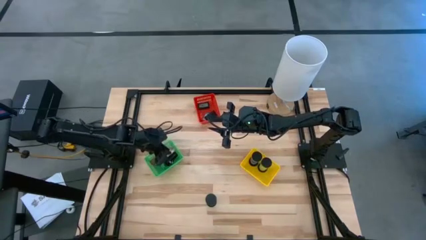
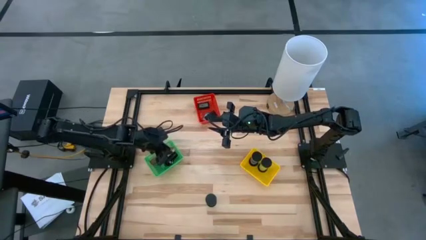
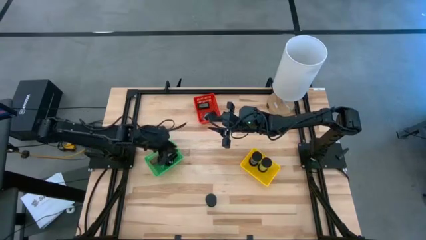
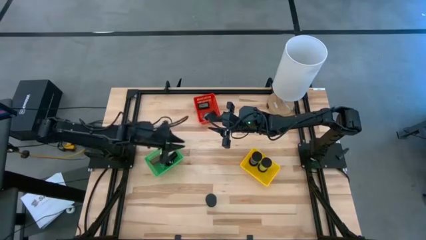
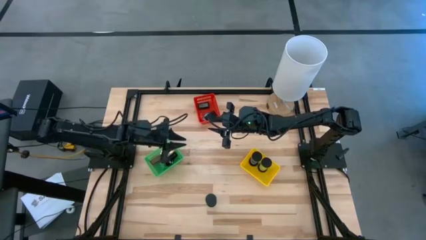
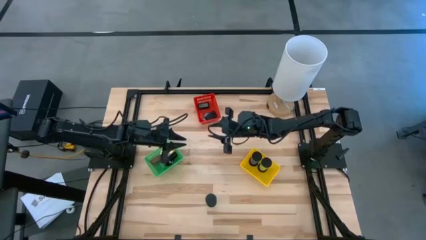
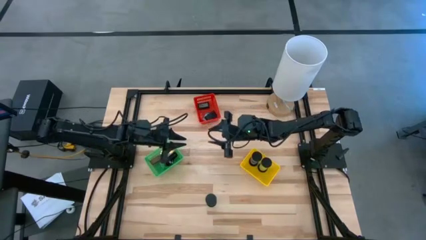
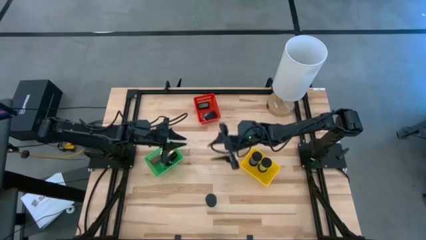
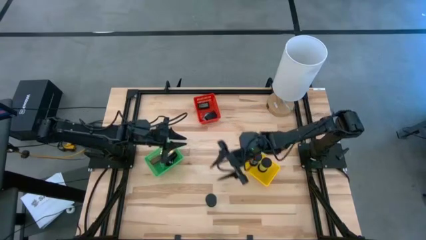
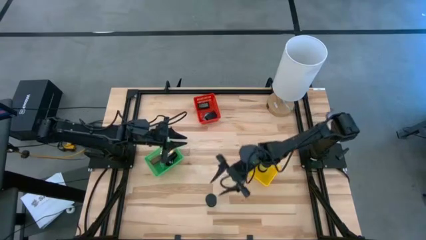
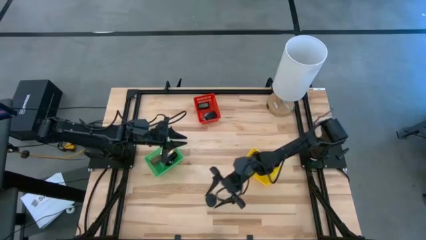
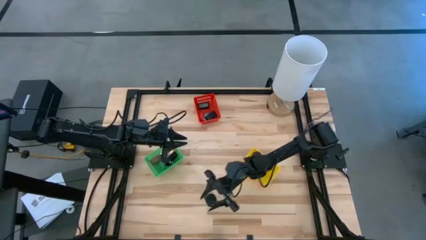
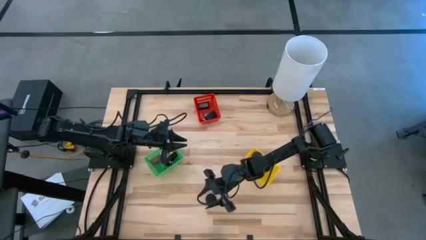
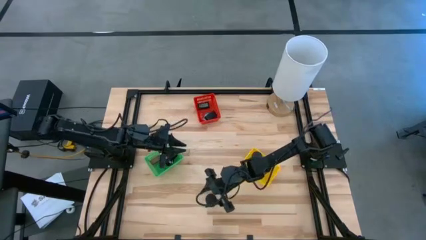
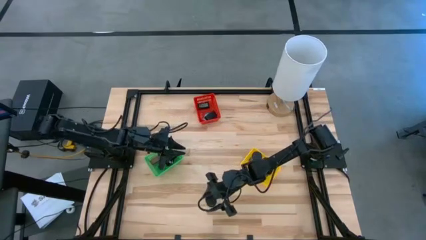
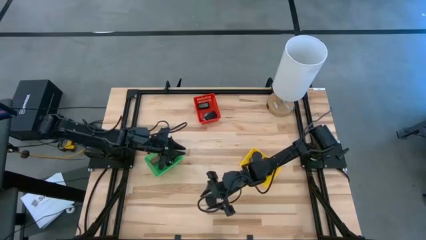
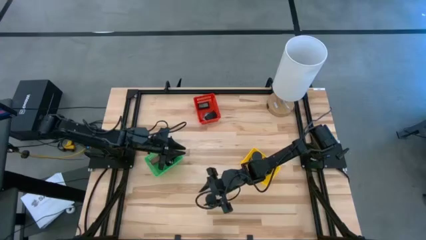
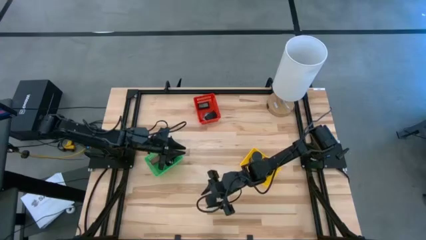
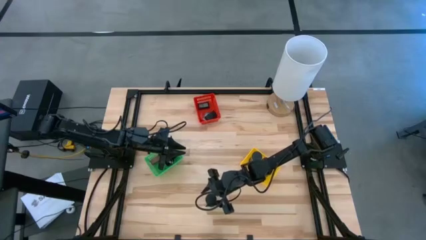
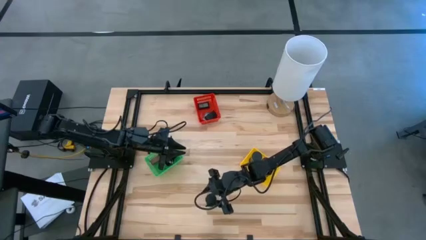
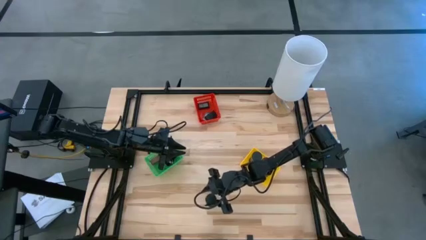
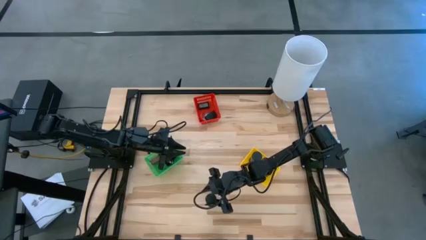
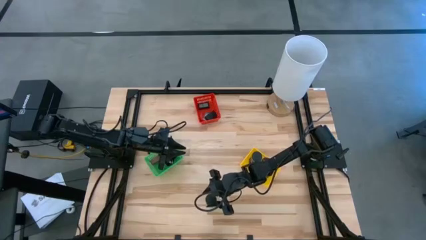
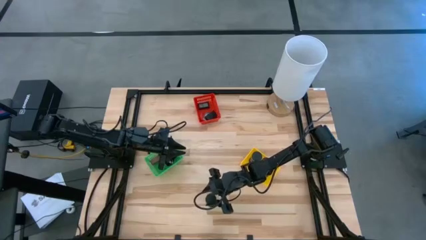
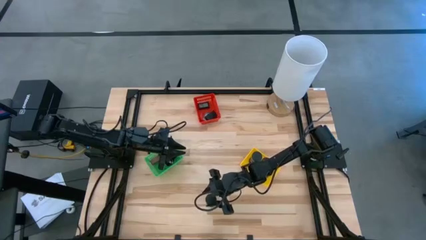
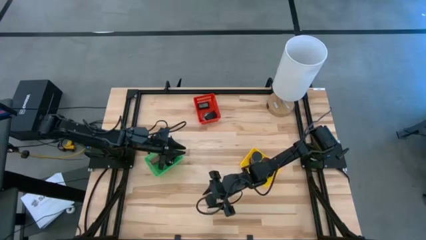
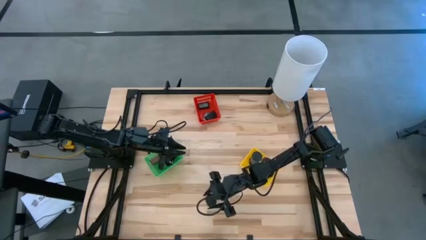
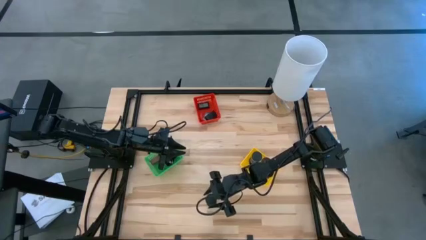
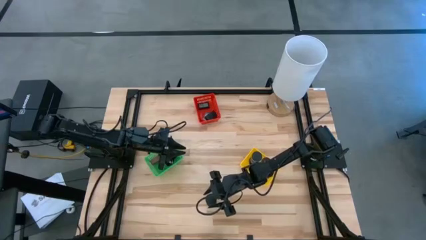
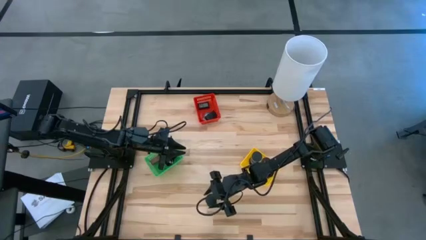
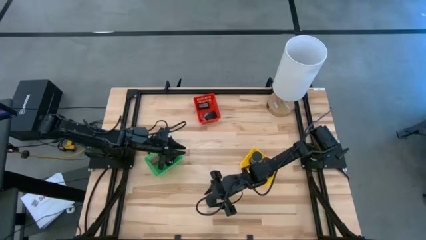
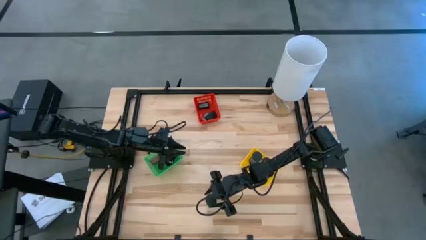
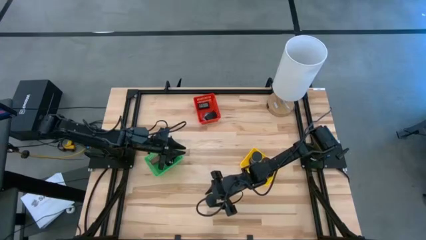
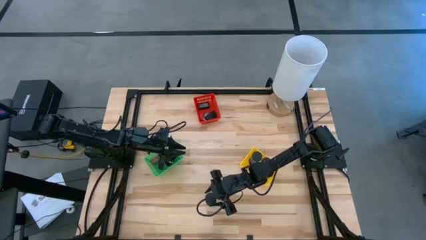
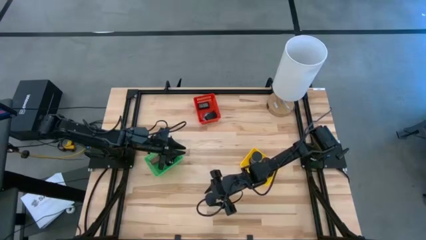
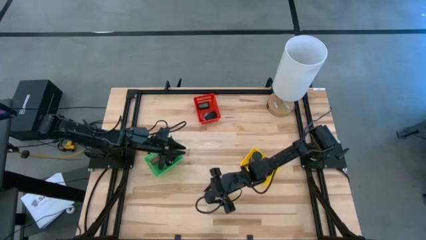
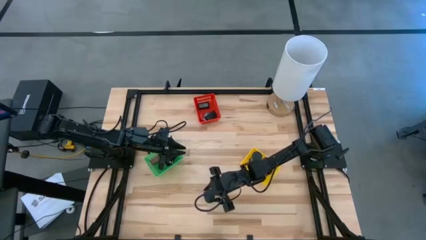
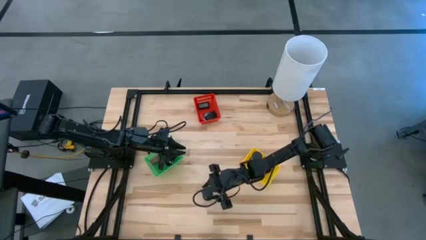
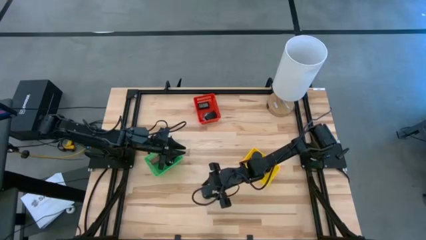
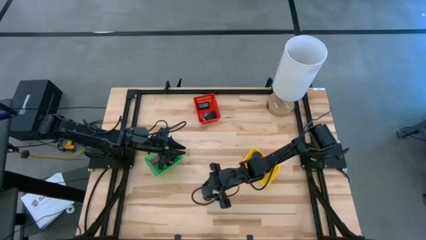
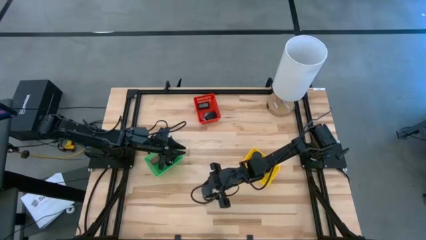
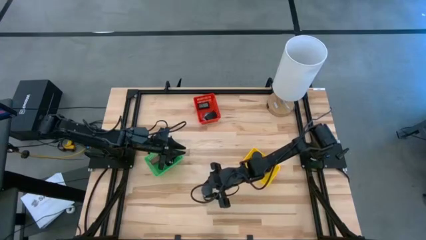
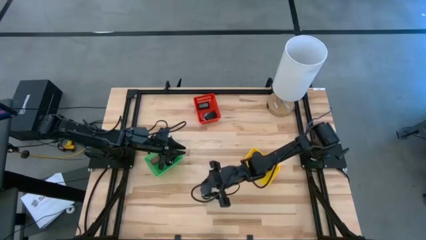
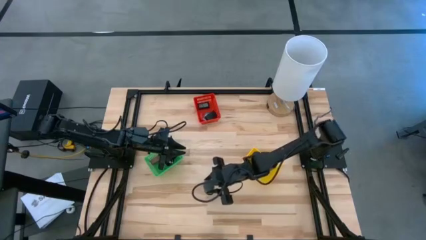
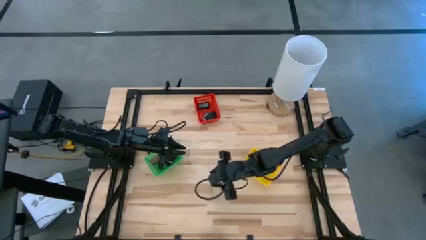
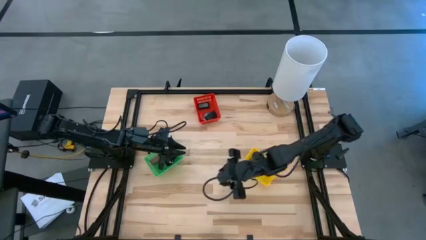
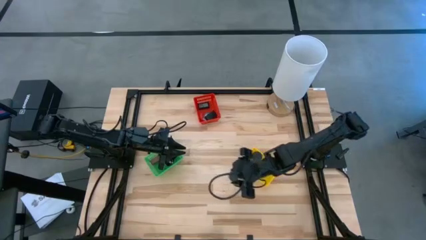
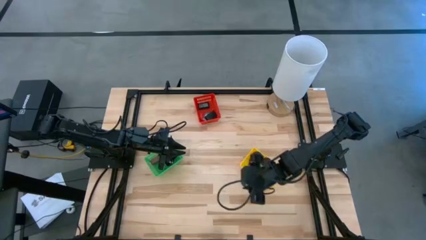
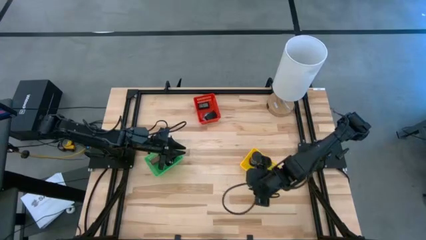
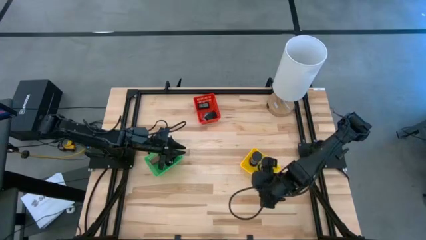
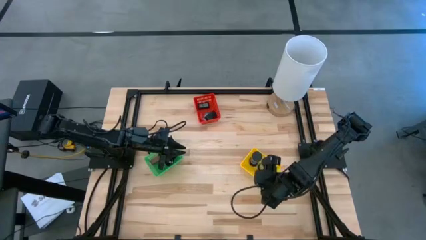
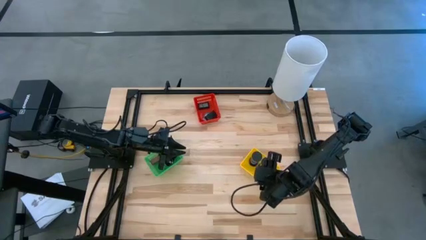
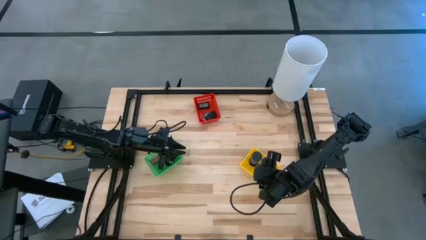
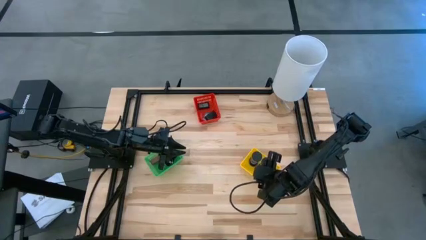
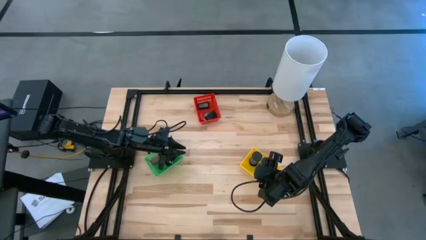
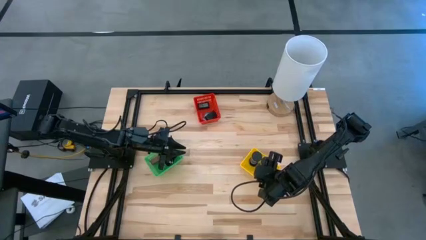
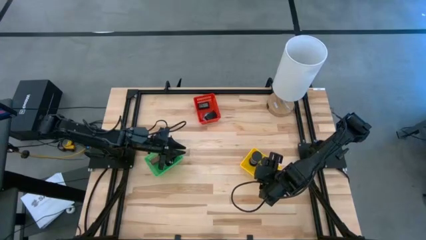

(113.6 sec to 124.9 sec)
Task: Pick & Place Office items
Put the green hourglass into the yellow bin

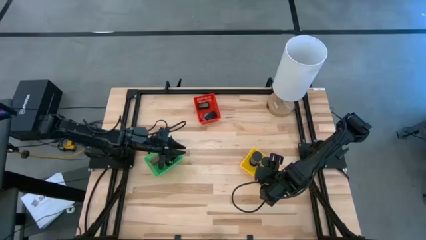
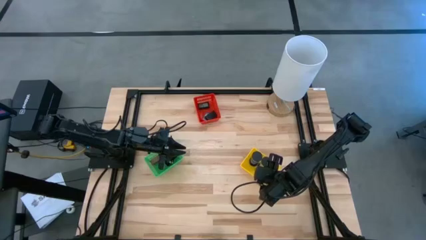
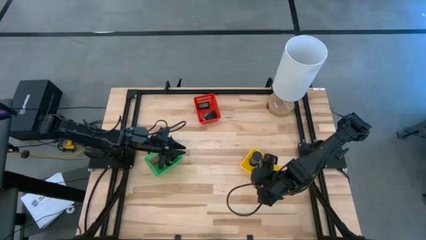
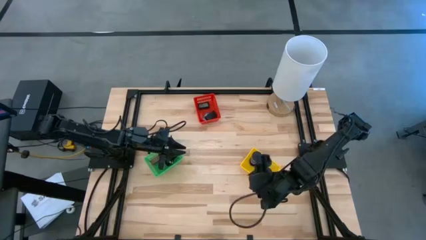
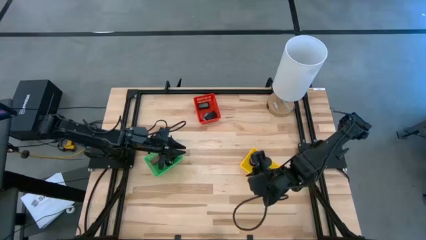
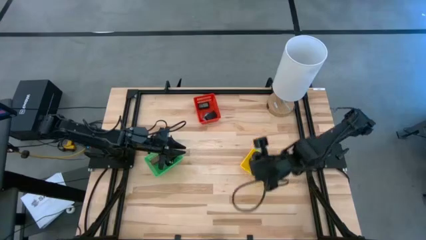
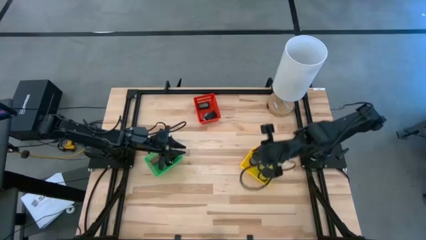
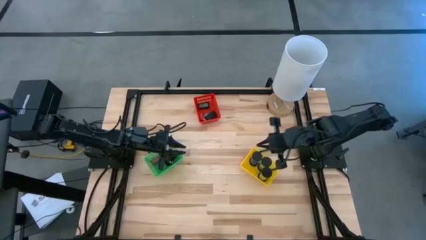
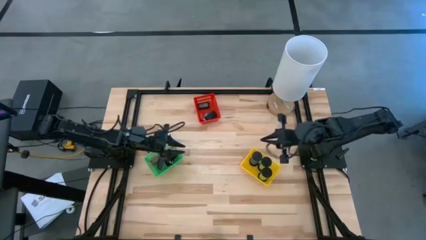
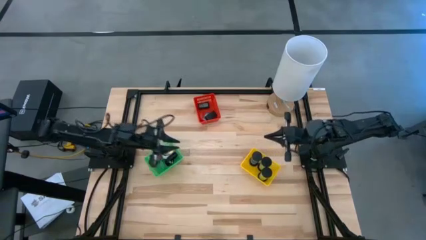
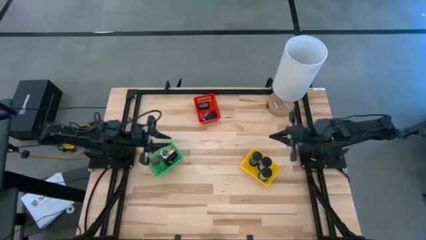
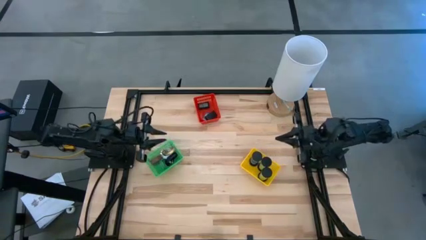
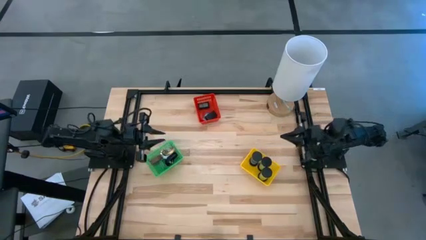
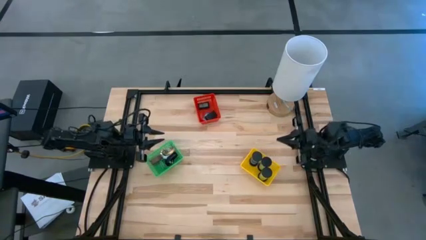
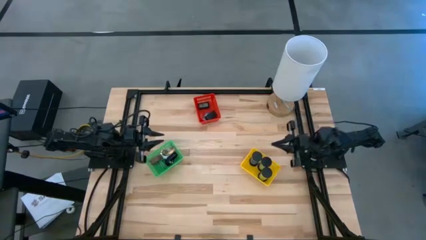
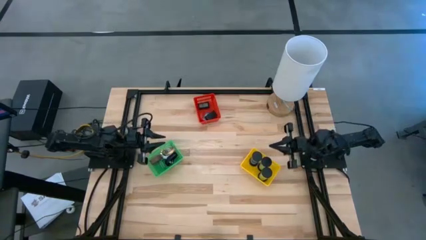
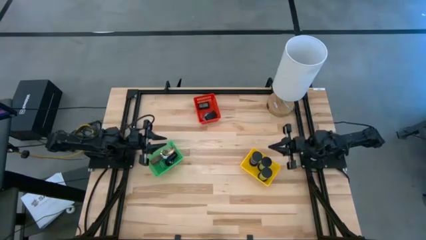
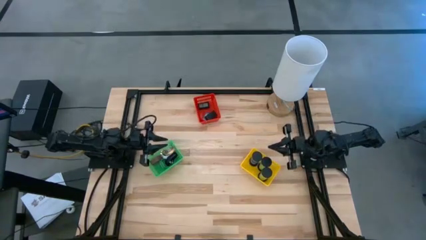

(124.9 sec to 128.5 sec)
Return to Home Position
